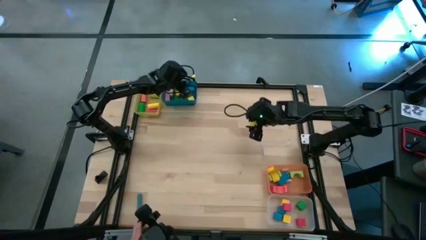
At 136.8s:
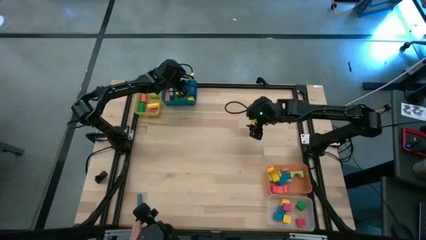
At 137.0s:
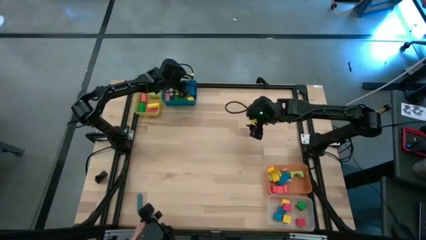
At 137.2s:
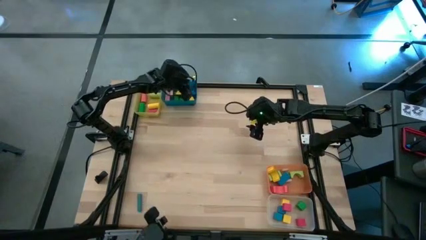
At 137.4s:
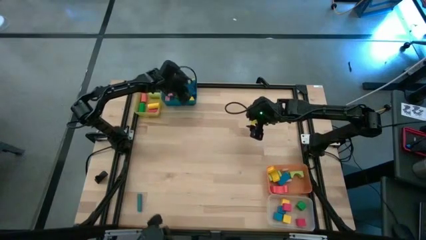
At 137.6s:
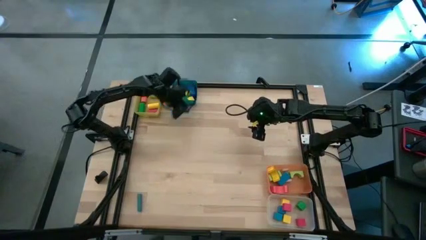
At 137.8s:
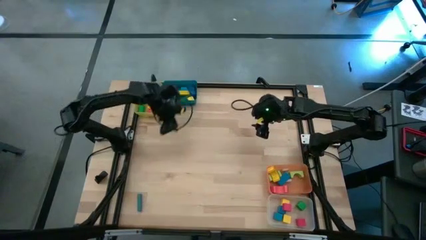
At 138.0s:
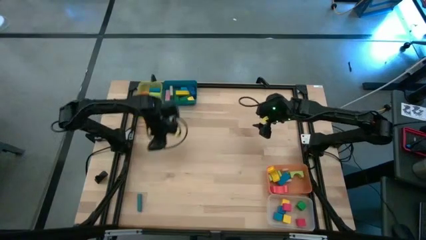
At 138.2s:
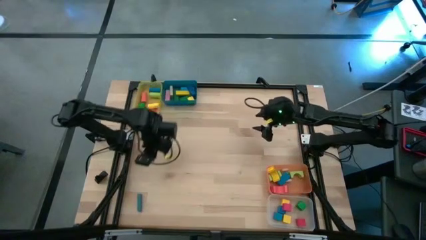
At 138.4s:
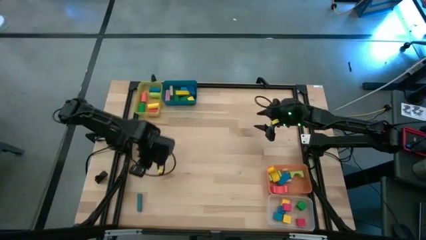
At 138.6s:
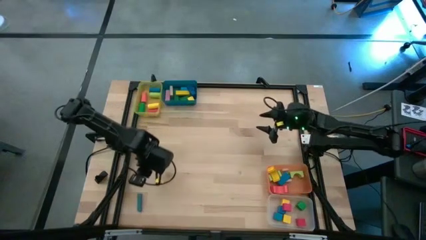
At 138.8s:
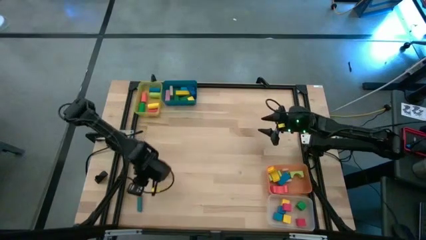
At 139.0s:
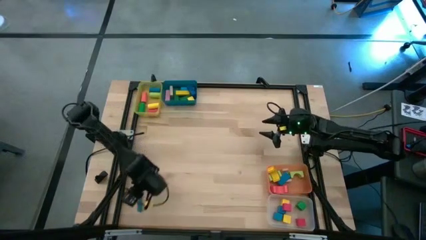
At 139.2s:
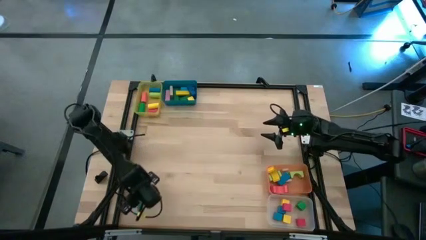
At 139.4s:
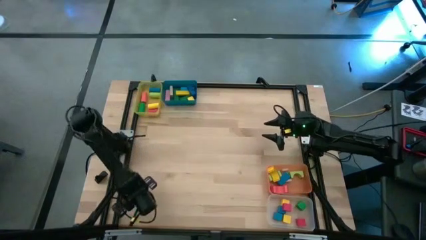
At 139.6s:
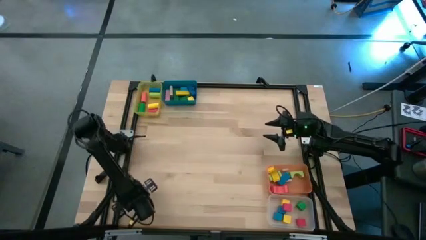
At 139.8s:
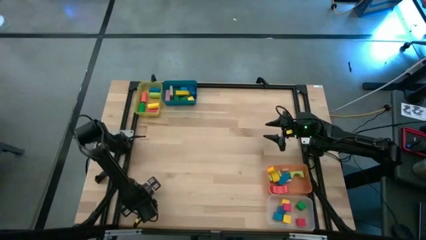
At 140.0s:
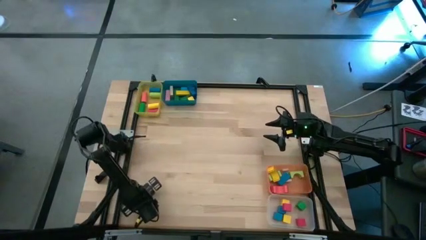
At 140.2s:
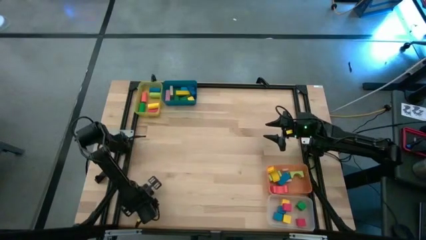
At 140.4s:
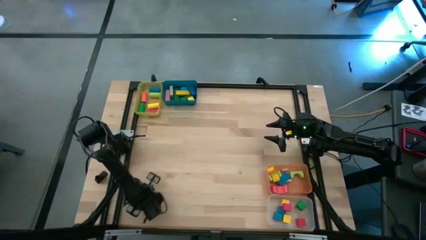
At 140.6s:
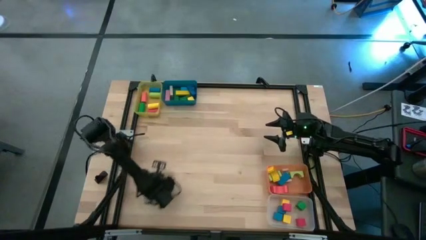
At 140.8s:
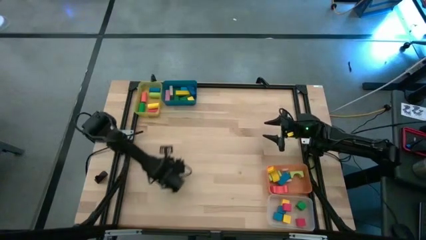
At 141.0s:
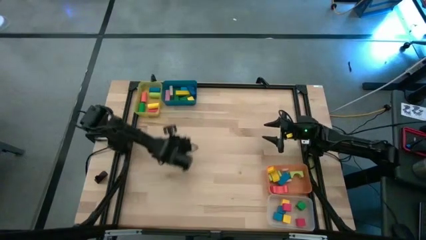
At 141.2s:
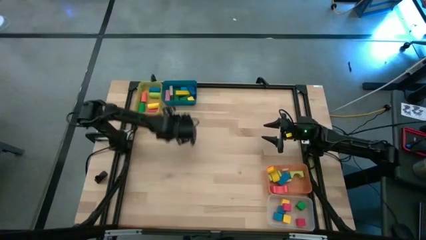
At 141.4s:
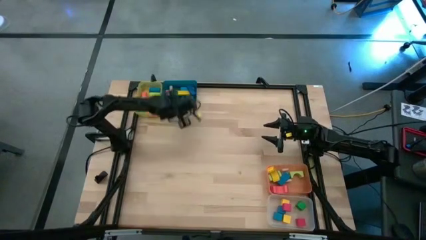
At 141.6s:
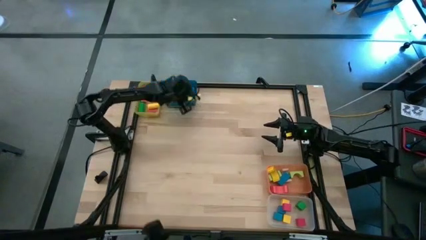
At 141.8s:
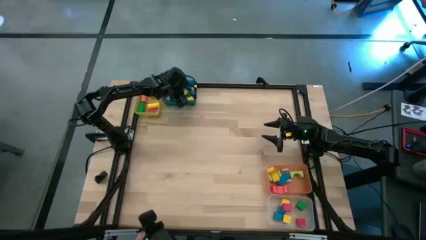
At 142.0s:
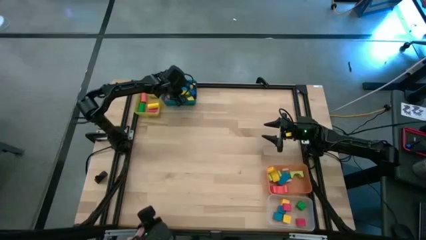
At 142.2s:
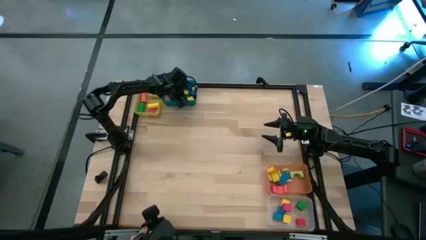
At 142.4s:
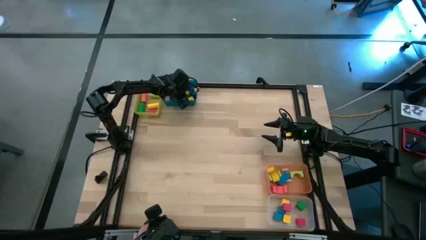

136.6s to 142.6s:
Task: Sort blocks by size
Put the light blue rectangular block into the blue bin

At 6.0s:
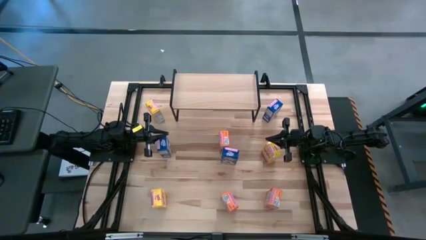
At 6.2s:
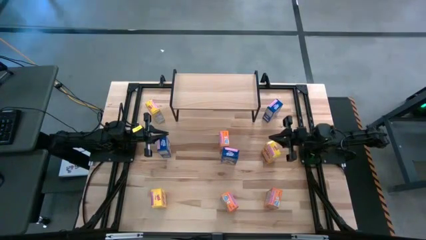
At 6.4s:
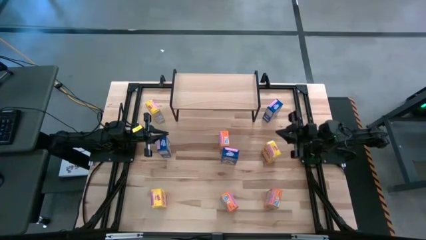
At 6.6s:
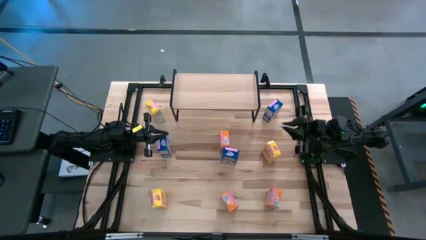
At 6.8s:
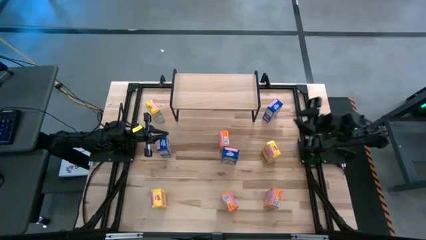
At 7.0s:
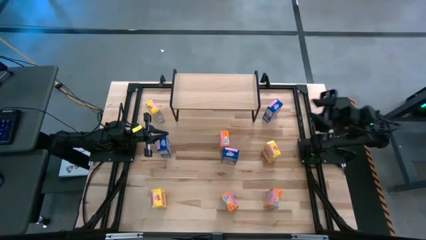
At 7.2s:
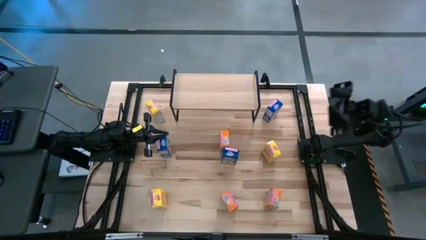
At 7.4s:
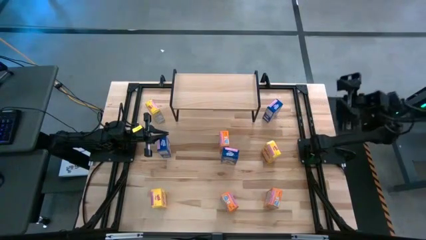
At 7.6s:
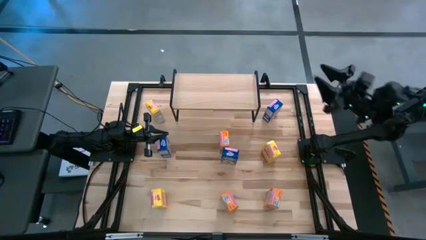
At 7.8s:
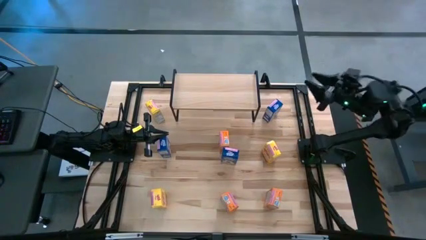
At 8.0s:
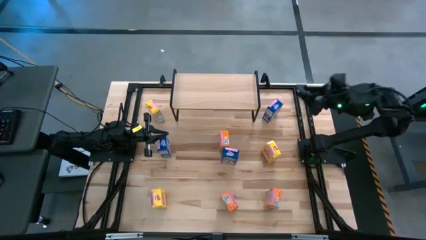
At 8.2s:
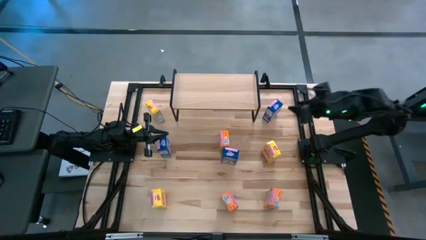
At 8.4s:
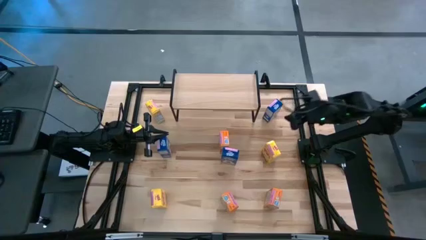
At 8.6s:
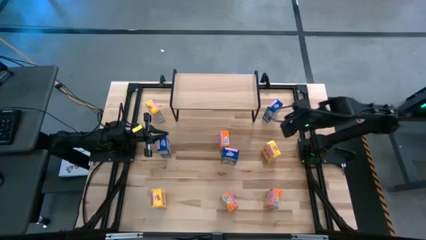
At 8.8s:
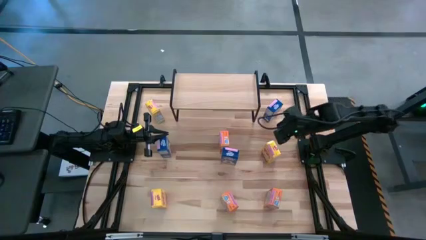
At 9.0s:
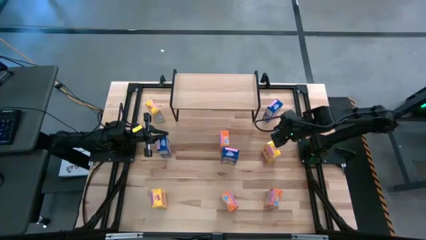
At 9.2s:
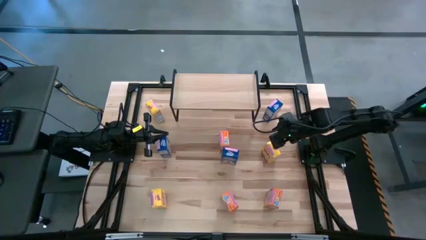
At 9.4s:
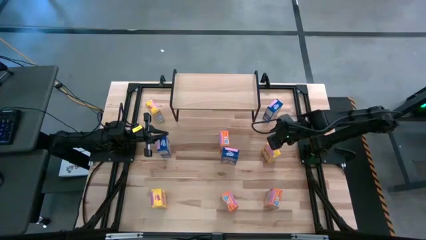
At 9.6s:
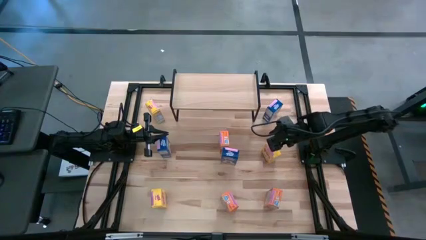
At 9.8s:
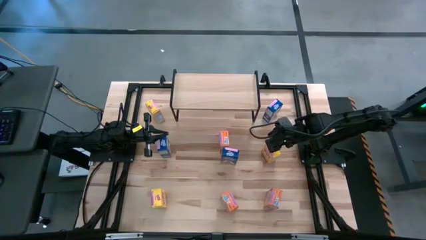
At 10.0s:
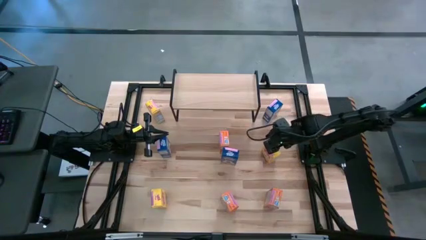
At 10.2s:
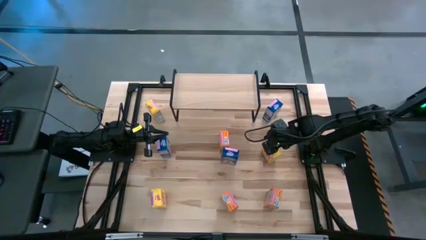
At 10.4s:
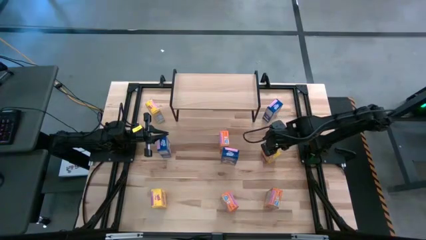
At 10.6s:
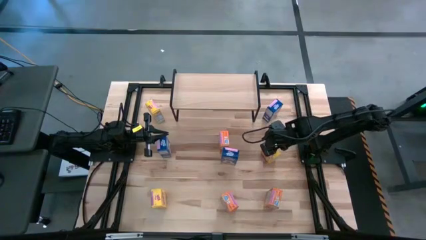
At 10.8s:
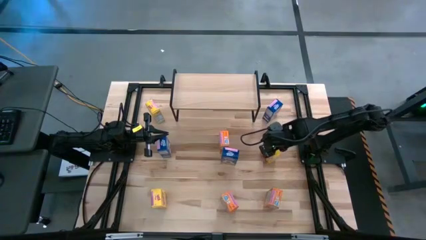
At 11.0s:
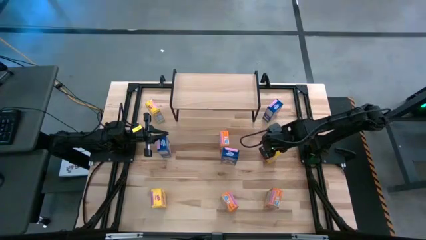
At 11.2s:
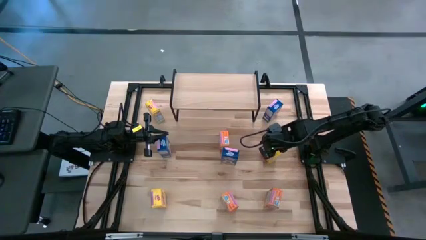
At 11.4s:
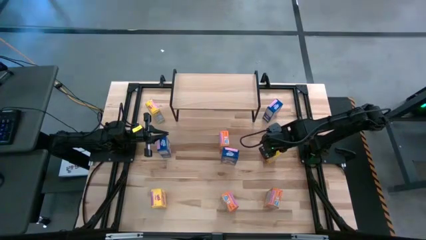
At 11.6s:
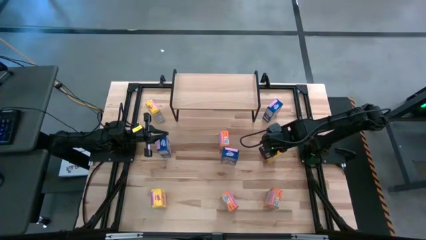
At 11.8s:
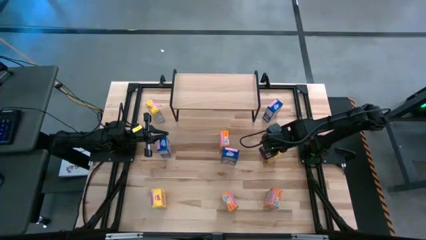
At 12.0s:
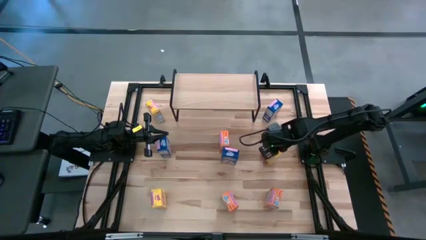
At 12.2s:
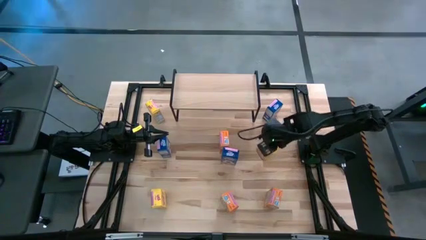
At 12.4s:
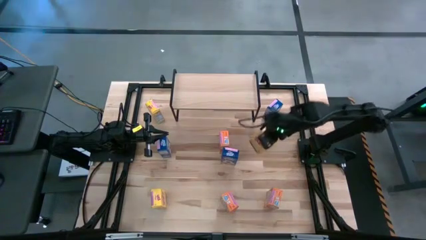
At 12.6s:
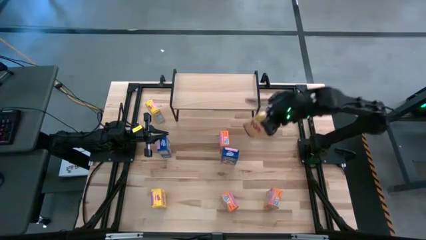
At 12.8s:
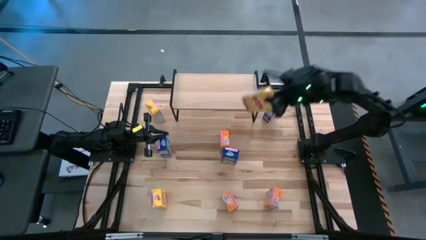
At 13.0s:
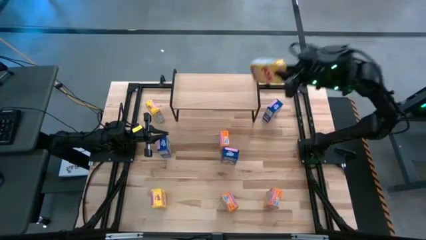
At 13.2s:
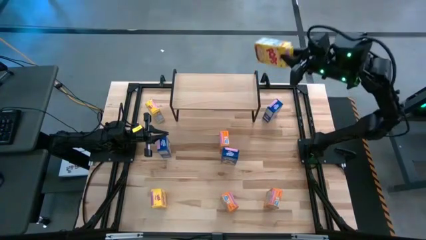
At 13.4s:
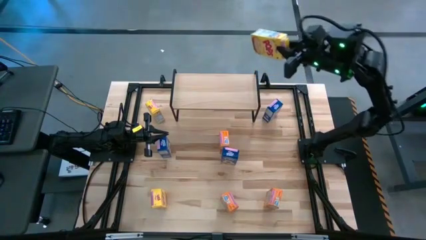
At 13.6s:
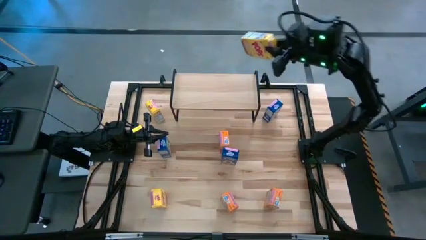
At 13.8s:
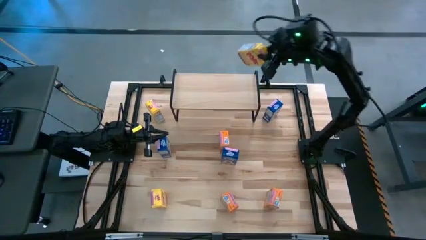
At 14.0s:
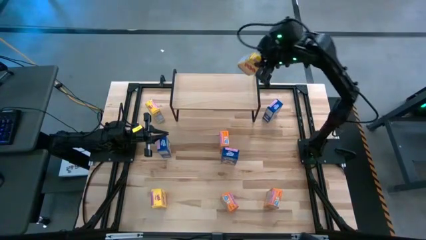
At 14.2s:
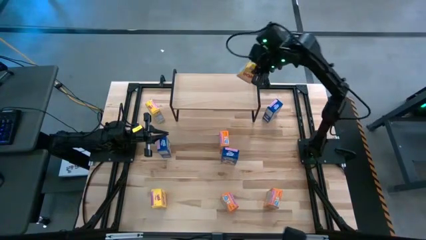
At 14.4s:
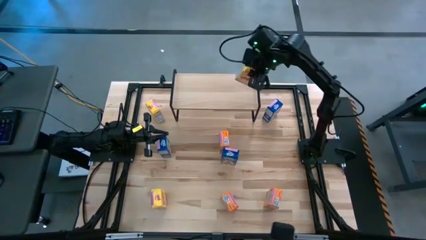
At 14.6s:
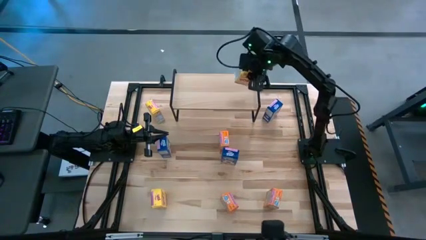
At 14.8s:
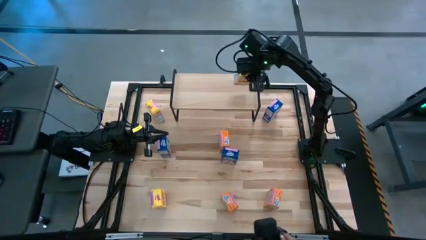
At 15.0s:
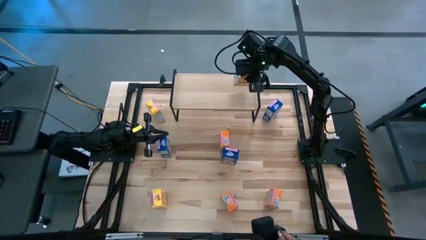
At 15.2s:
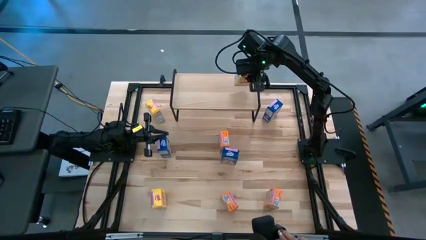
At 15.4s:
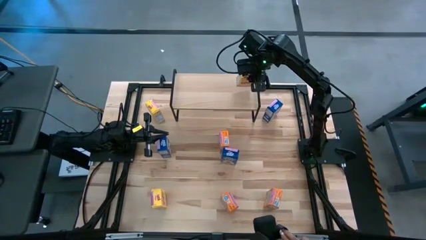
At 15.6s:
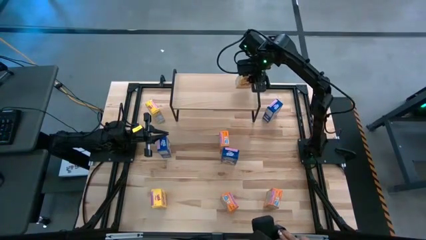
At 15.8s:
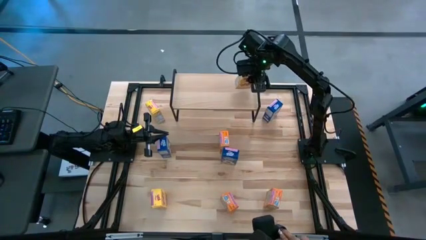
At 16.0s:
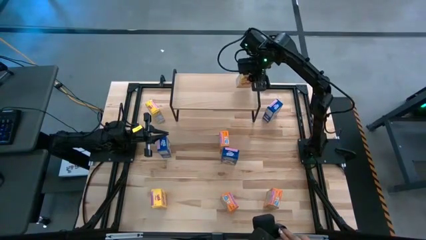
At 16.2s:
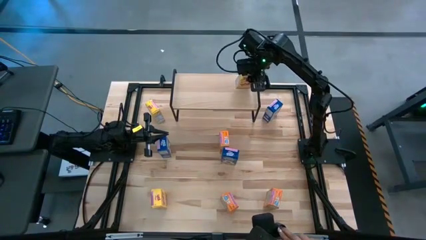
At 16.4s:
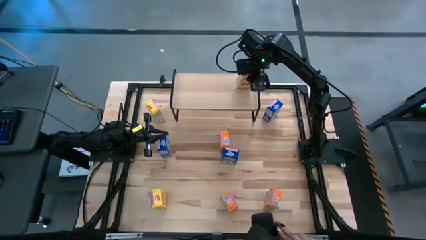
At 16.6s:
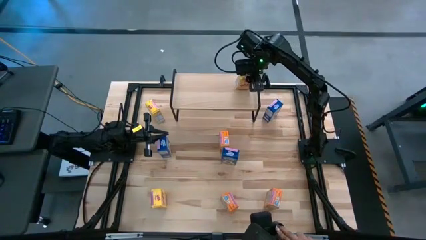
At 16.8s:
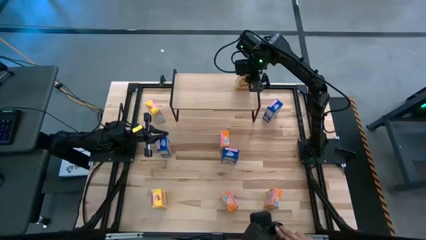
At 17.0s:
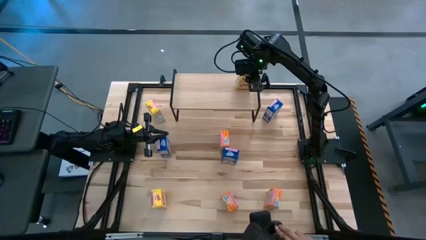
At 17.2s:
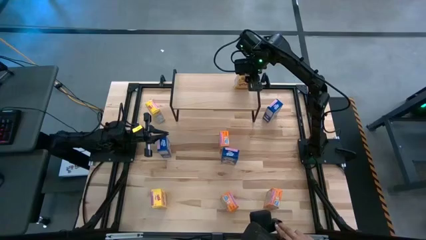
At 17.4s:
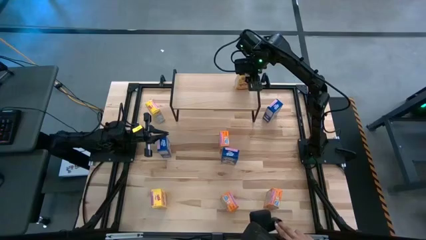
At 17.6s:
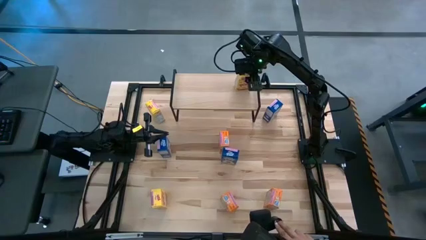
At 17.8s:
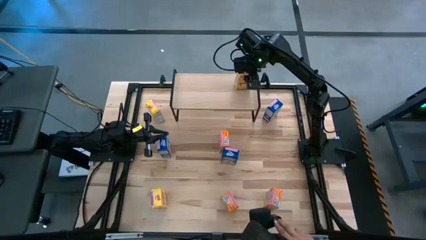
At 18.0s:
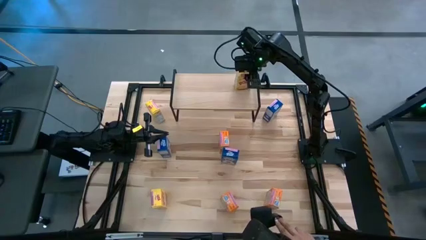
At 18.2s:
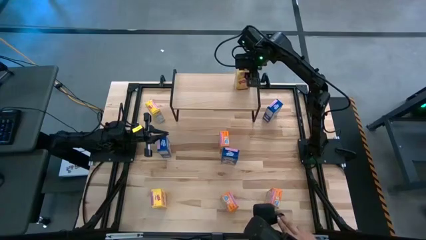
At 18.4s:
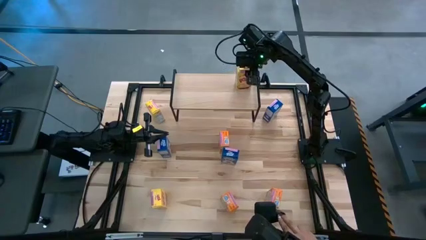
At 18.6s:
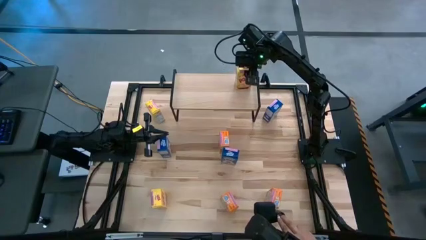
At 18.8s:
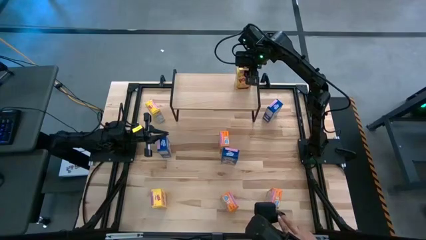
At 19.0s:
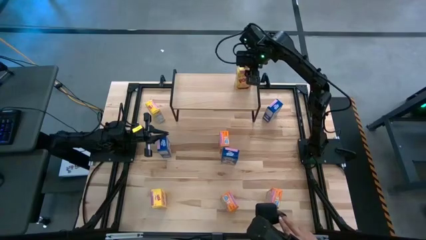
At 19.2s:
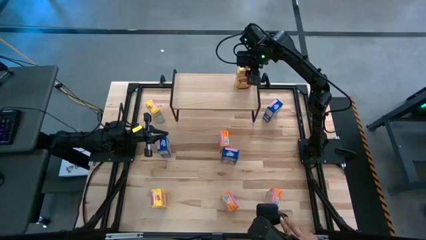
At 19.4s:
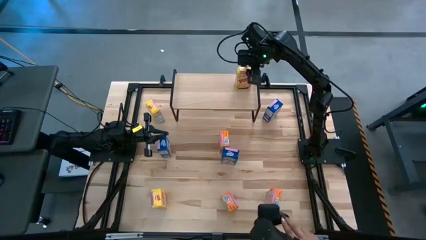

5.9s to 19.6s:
Task: Stack cereal on shelf
Put the middle yellow cereal box on the shelf
